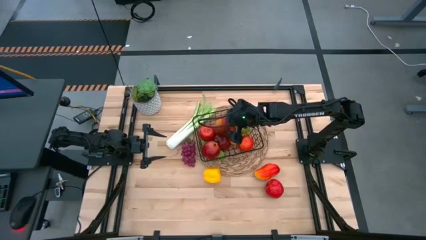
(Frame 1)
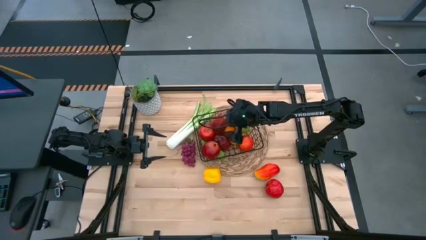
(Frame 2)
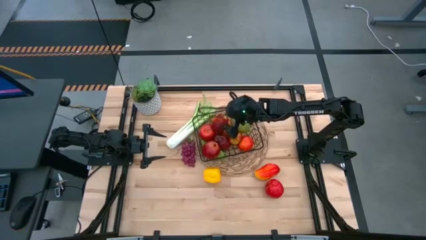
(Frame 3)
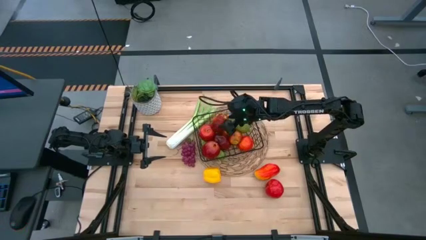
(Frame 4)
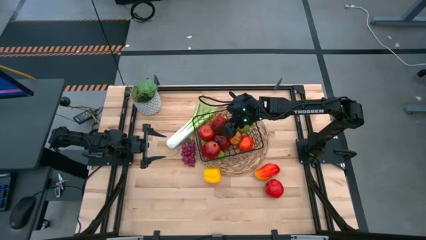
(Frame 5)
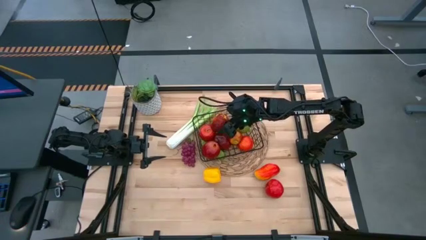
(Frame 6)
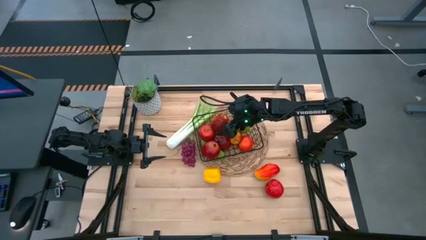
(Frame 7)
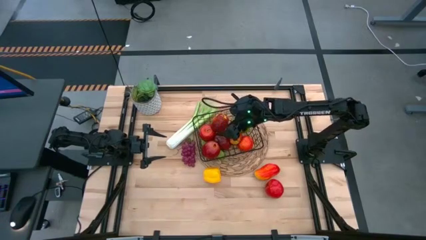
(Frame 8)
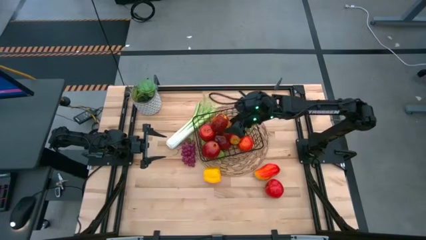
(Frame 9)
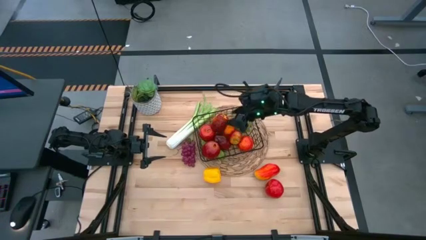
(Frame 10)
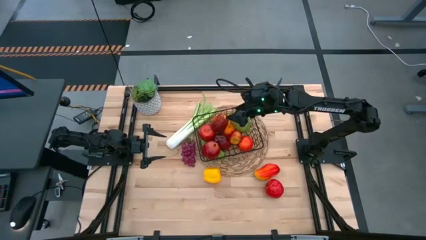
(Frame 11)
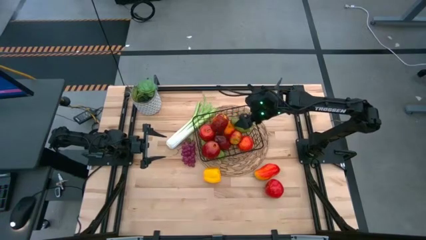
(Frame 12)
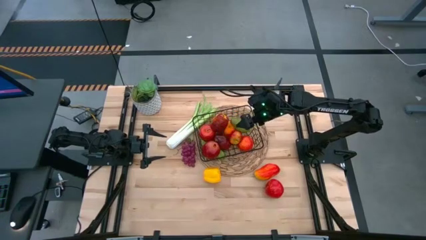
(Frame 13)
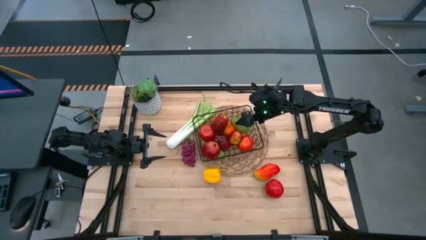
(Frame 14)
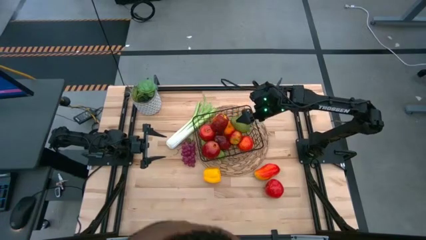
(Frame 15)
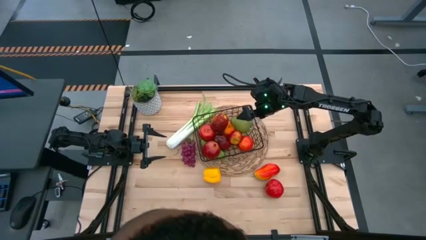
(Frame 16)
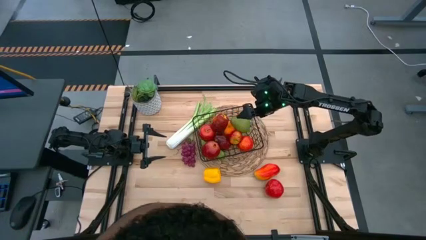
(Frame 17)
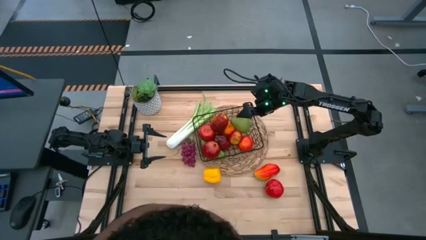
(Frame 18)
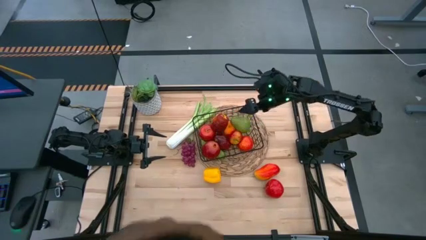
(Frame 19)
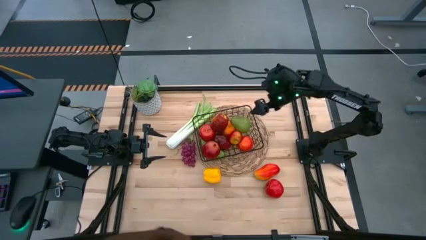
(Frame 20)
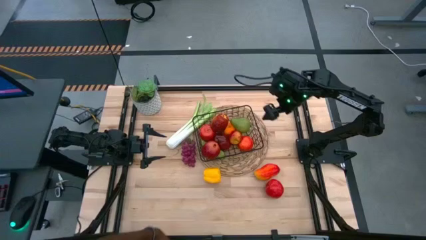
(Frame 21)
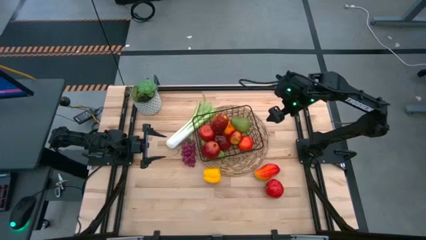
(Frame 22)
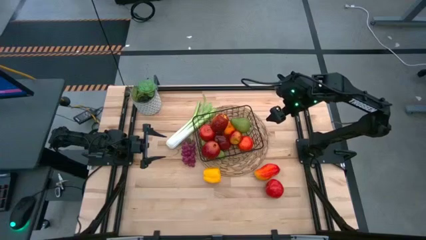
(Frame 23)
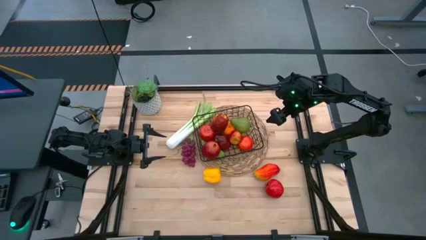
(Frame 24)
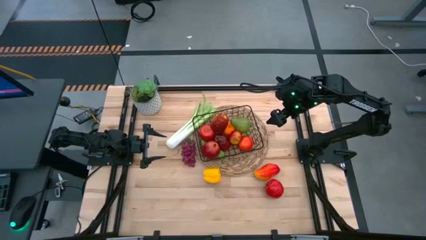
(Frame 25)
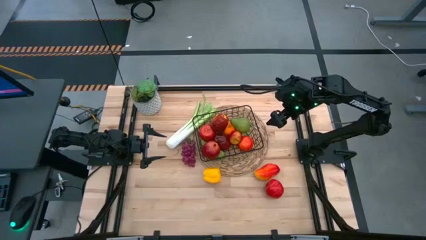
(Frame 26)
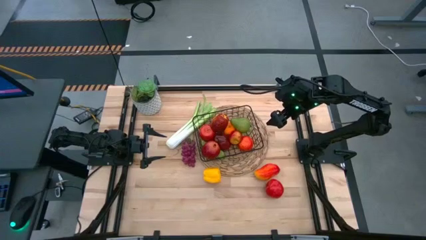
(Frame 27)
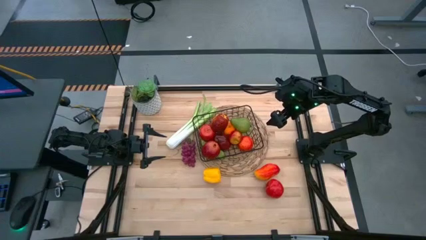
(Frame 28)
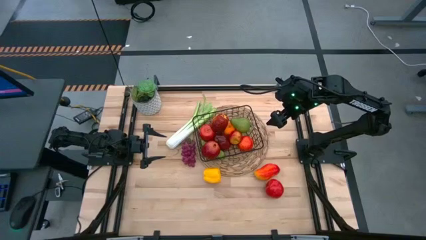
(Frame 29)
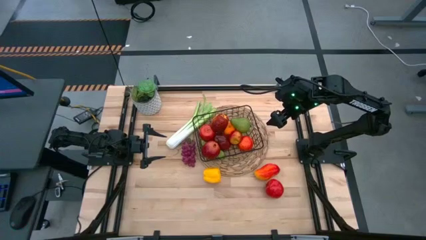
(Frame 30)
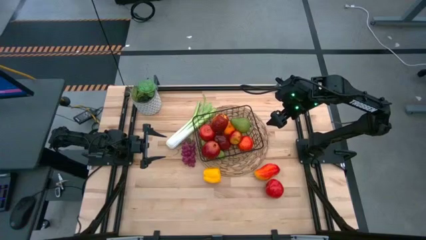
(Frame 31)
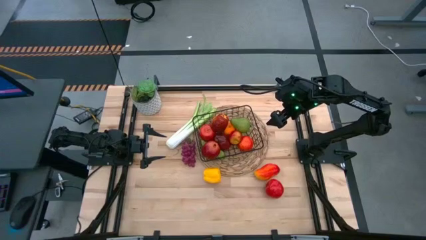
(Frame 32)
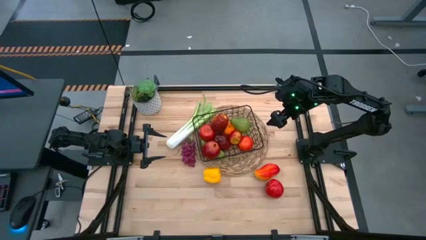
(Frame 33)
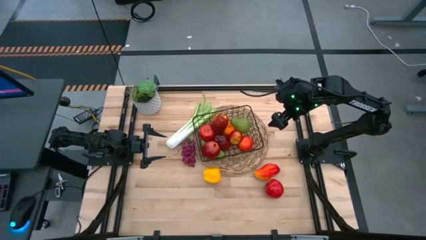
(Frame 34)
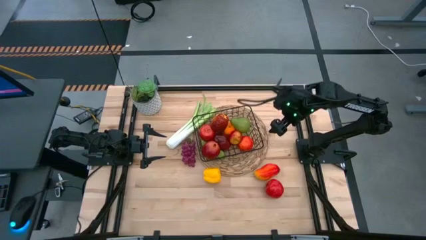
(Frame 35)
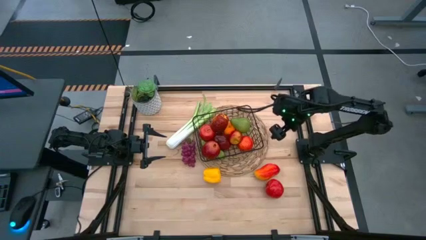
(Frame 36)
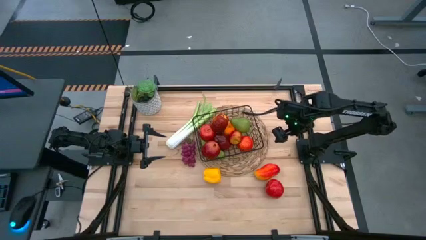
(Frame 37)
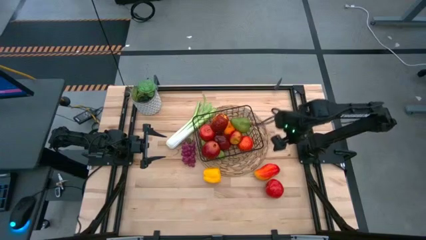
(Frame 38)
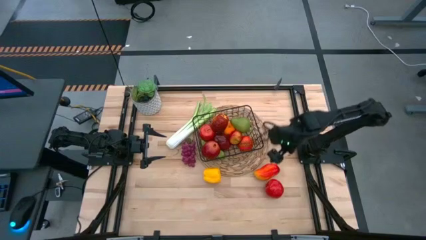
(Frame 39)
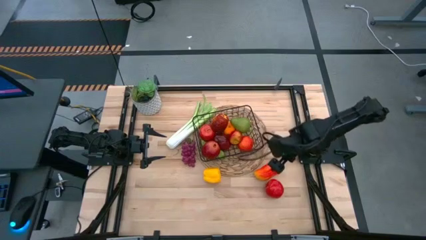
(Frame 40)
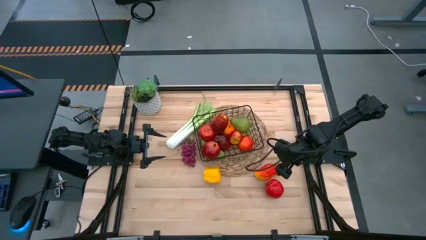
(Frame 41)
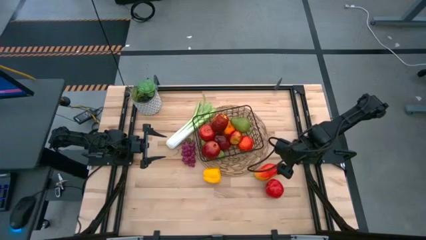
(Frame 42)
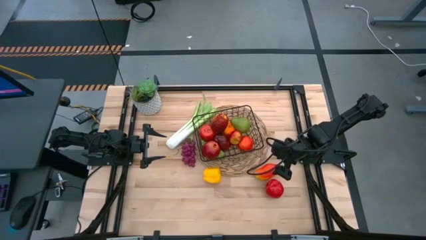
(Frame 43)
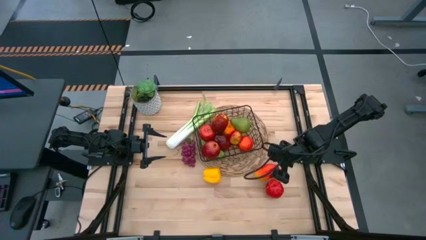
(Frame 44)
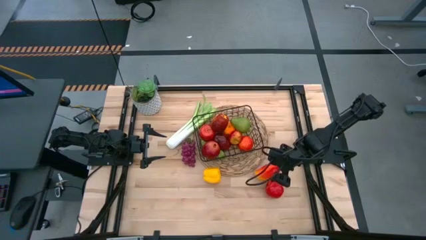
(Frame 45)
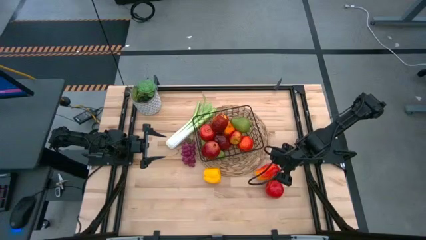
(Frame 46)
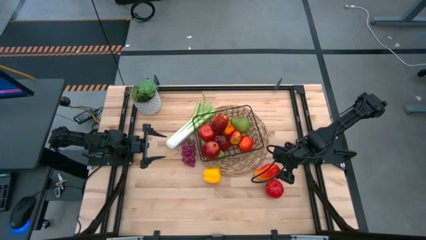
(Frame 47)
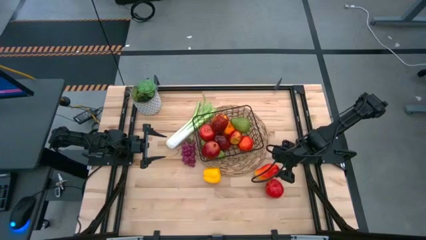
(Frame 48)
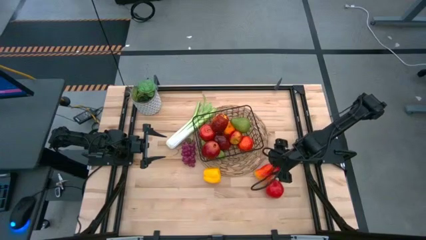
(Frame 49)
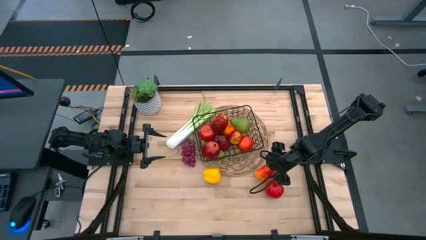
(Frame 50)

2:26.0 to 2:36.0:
Task: Build produce basket
Put the red mango into the black wire basket
